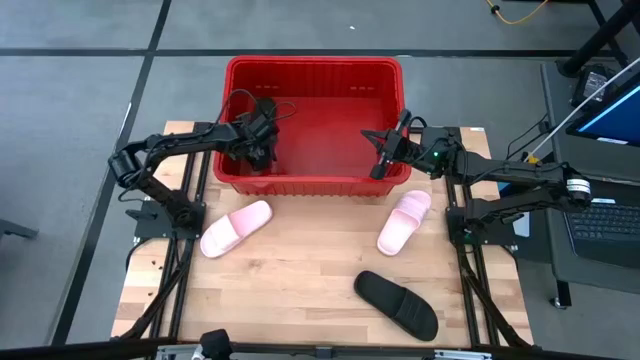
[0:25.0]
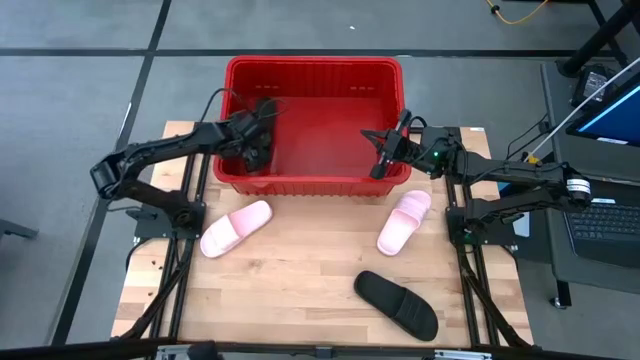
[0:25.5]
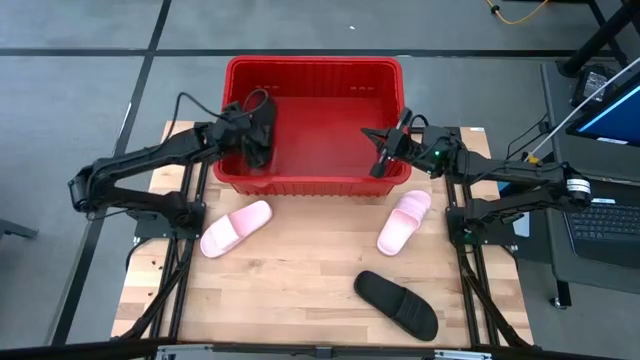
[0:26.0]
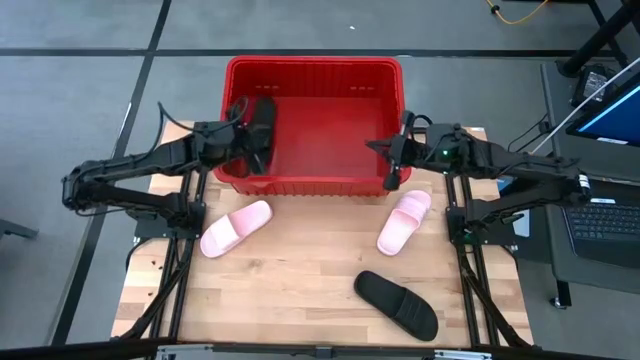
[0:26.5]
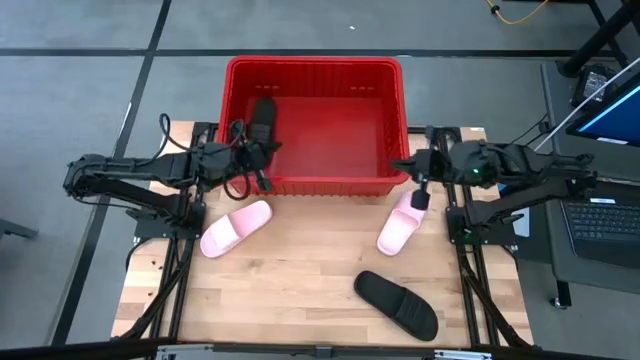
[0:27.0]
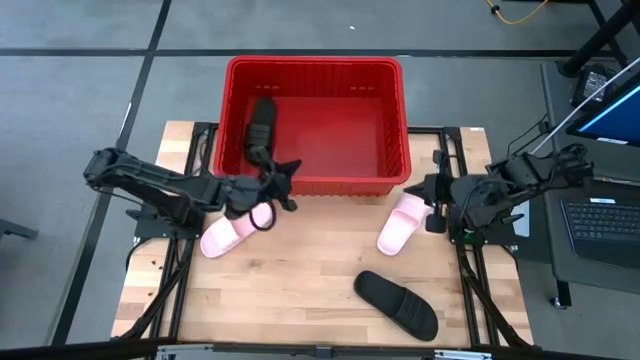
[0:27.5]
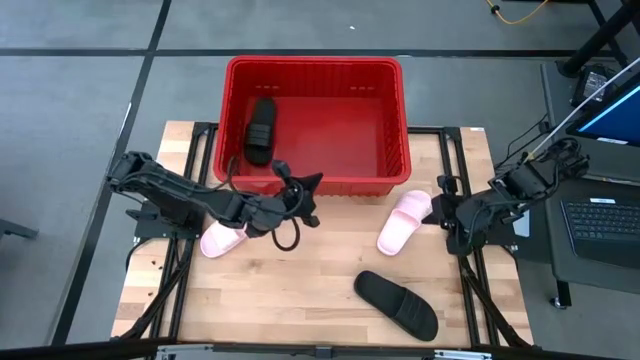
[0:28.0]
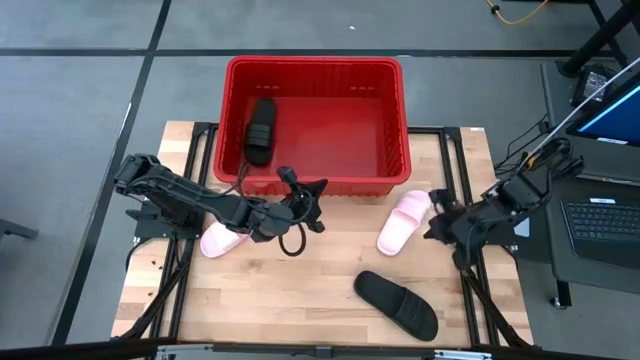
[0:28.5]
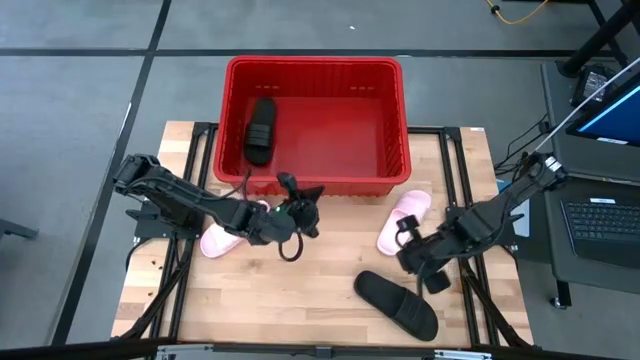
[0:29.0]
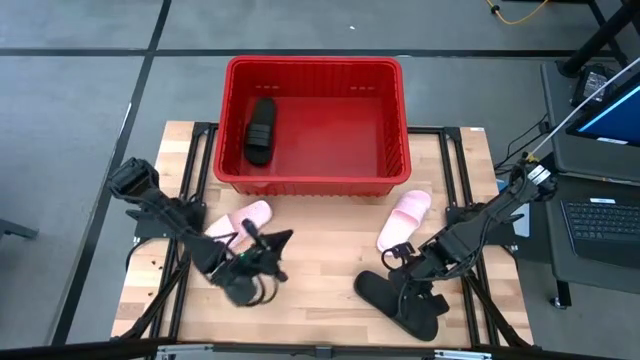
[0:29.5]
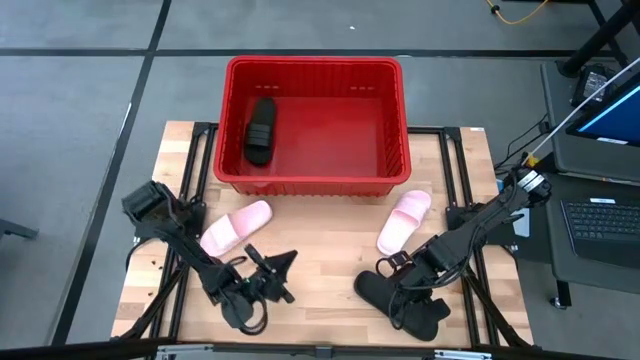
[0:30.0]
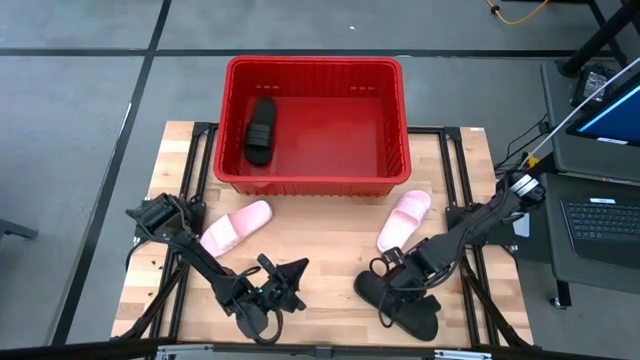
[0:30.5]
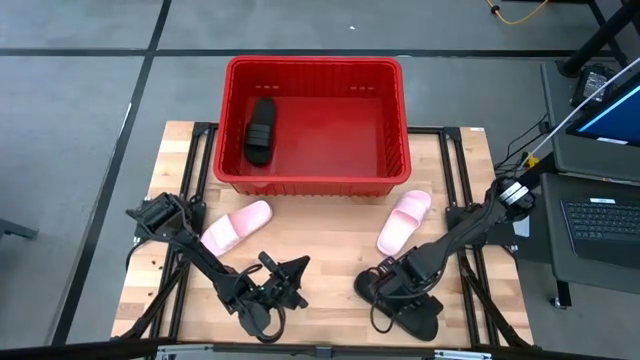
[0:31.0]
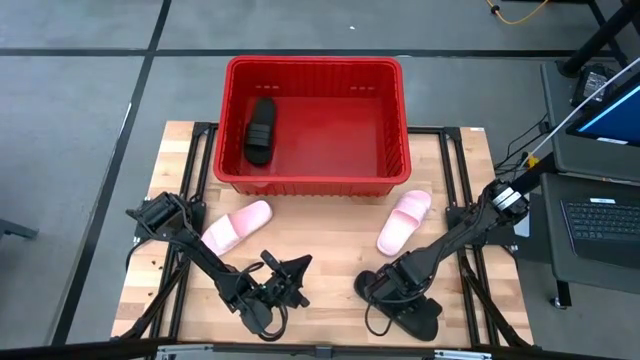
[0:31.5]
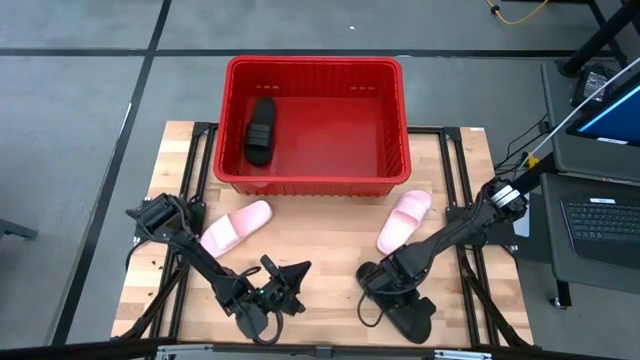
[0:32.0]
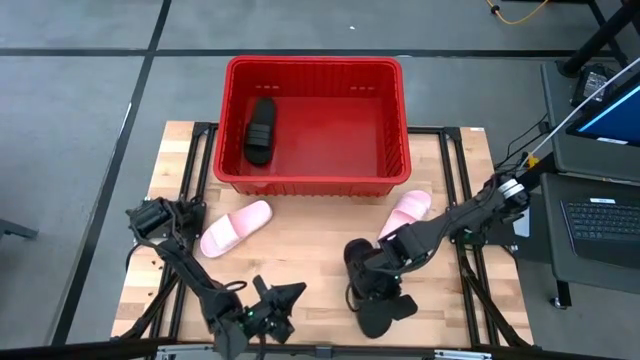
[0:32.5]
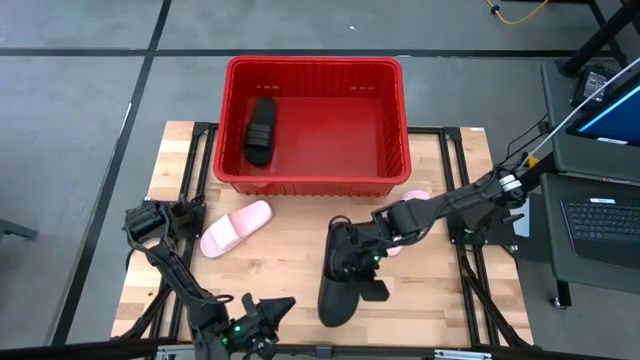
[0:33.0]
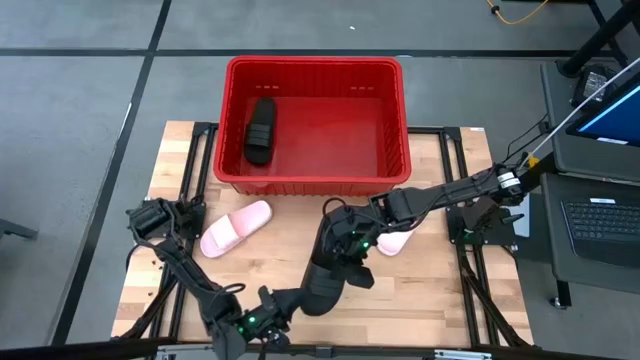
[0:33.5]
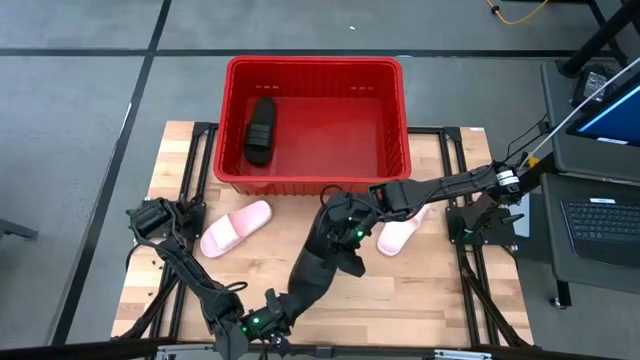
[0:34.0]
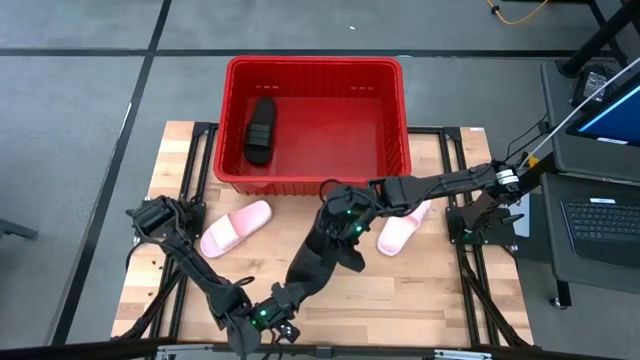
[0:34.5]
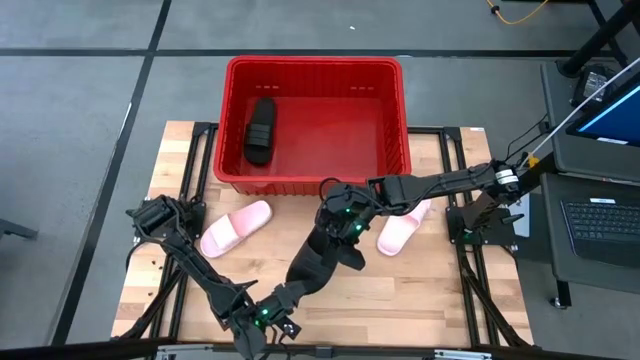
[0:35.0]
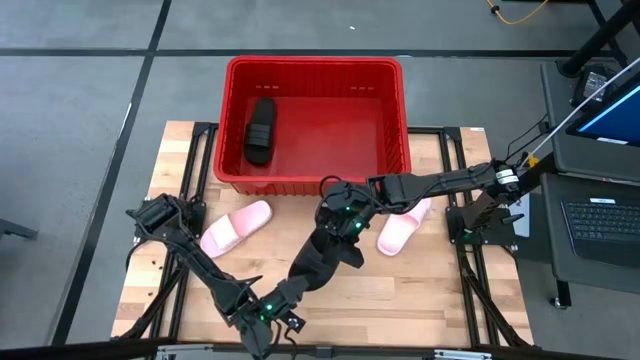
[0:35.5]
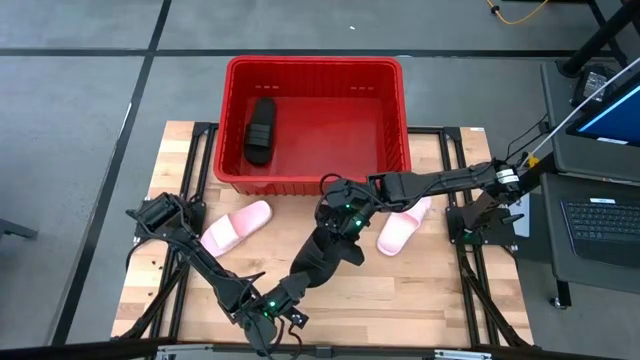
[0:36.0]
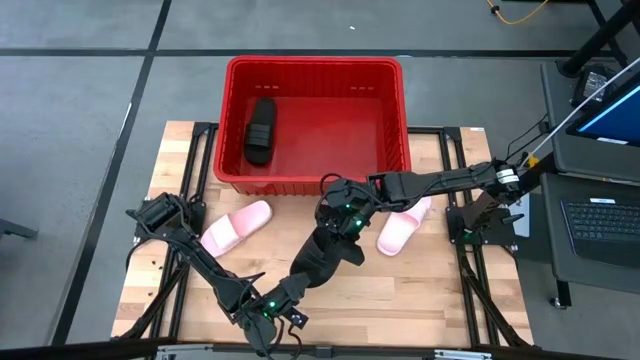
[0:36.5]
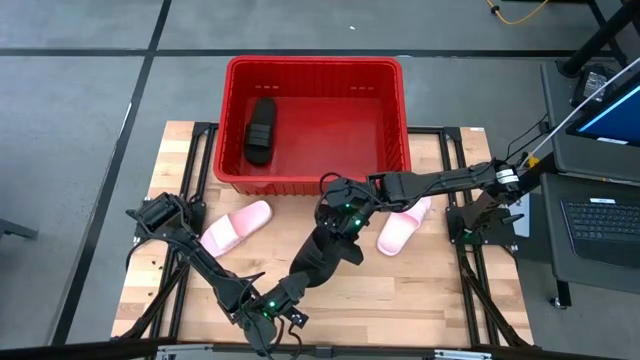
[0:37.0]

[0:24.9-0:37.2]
Task: Pick and place slides into bin
Put the black slide into the red bin

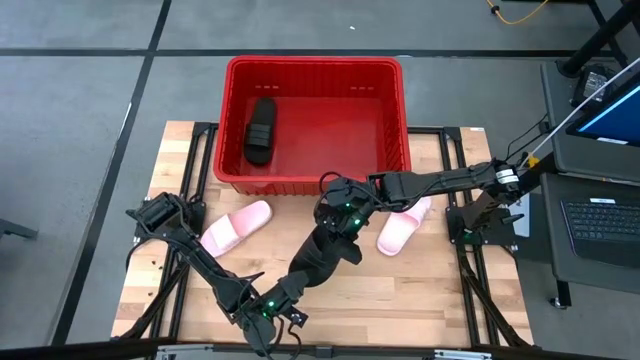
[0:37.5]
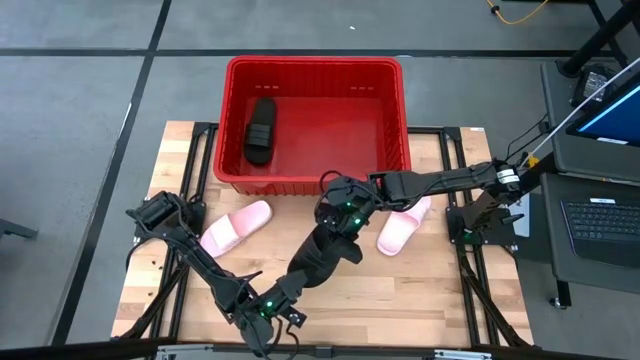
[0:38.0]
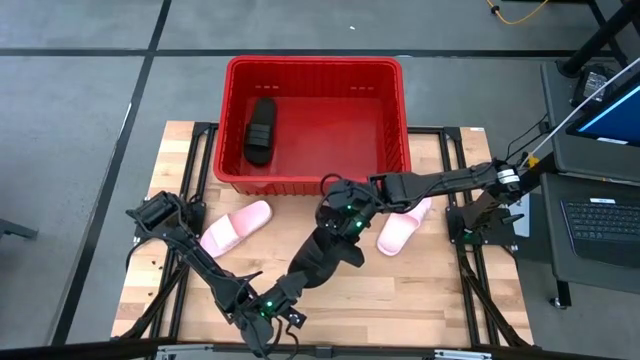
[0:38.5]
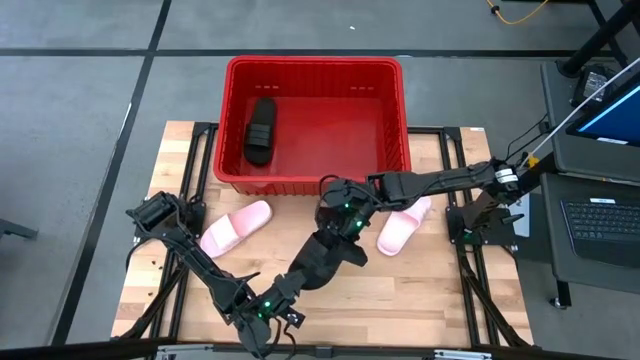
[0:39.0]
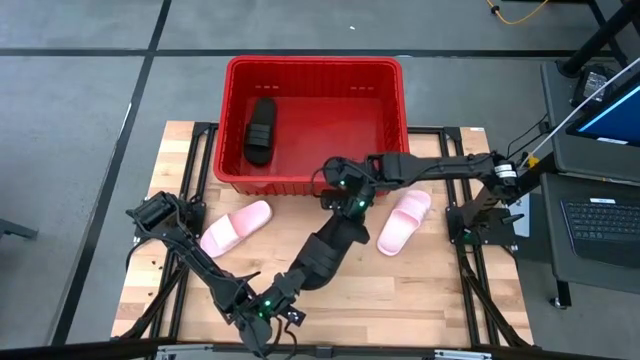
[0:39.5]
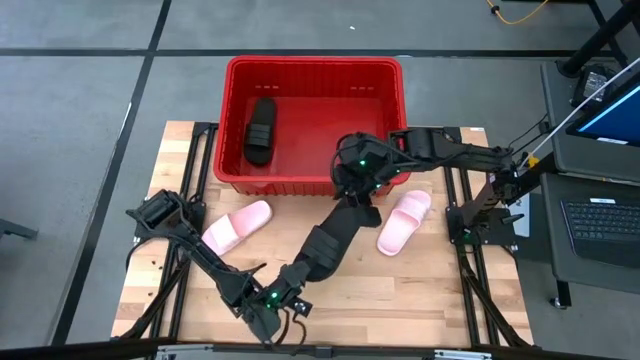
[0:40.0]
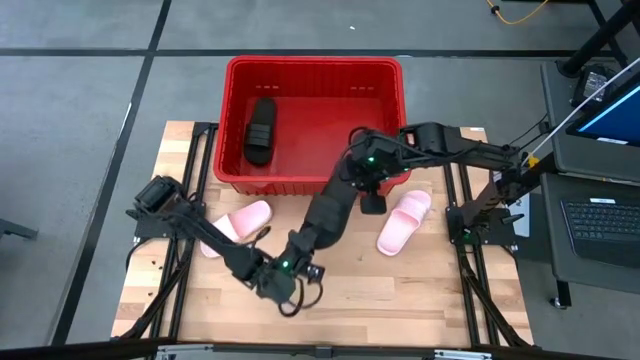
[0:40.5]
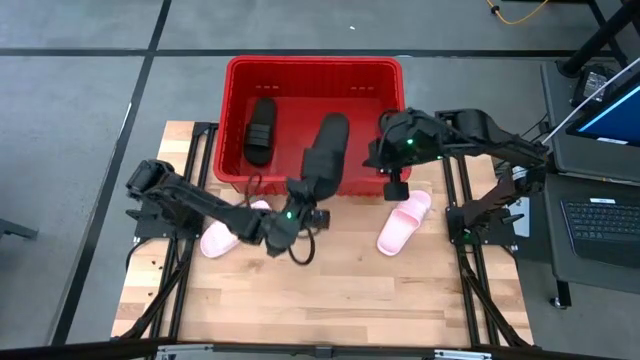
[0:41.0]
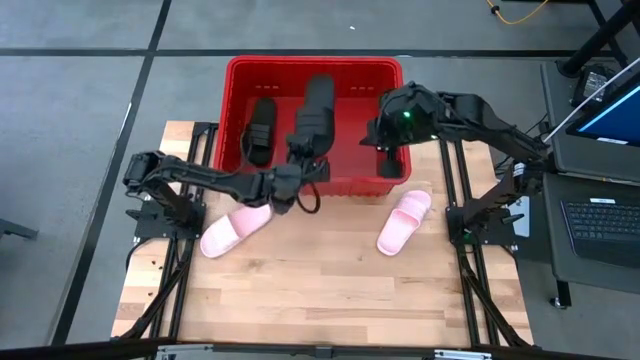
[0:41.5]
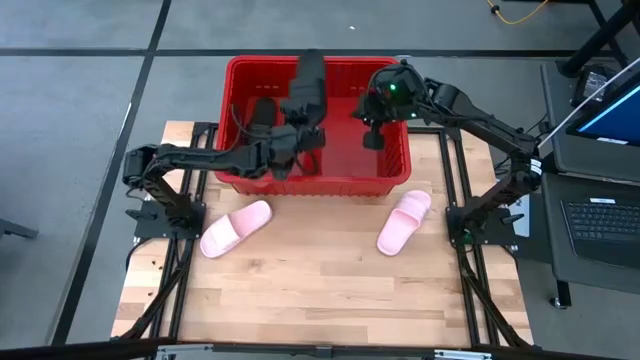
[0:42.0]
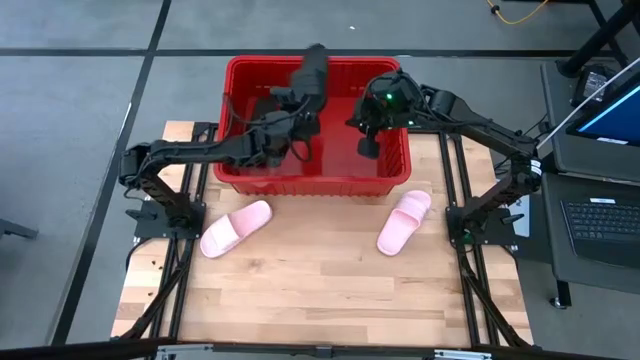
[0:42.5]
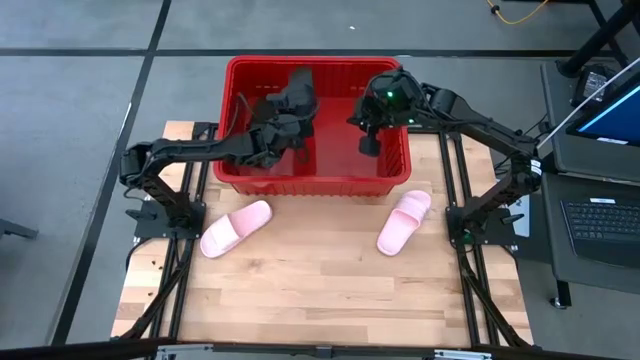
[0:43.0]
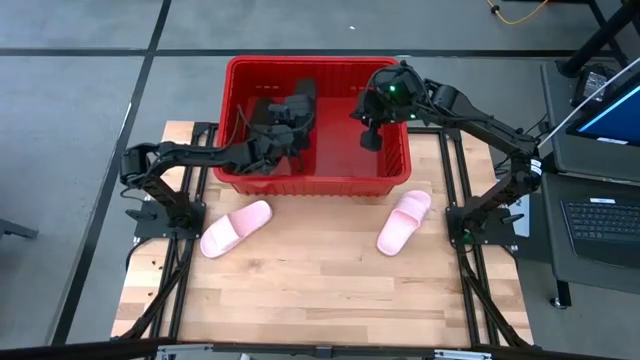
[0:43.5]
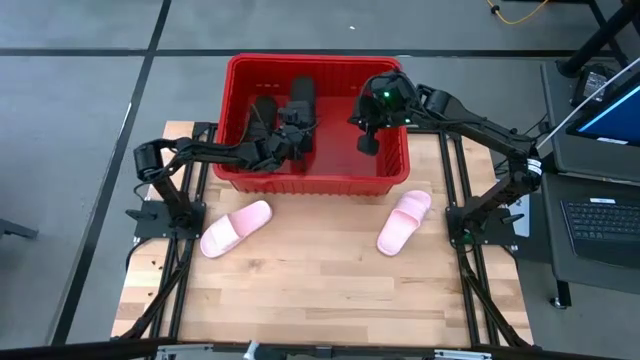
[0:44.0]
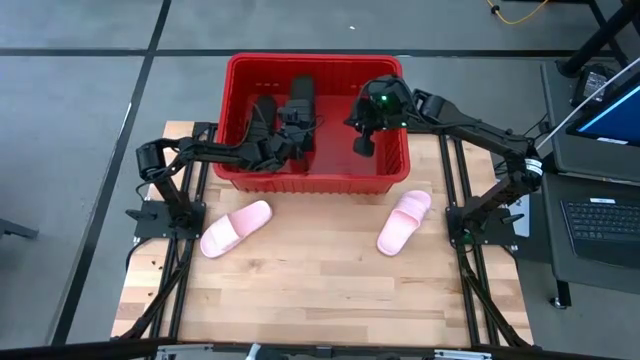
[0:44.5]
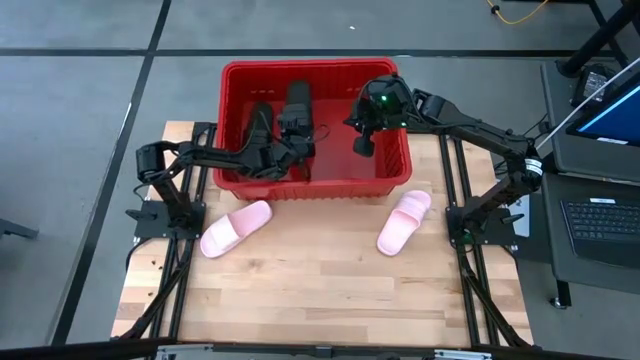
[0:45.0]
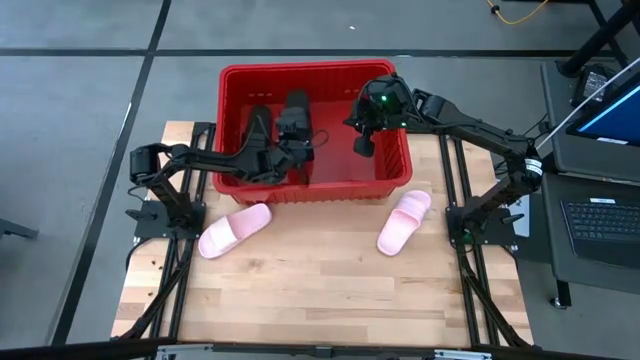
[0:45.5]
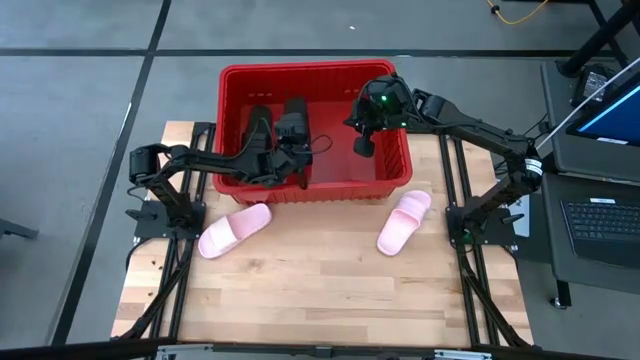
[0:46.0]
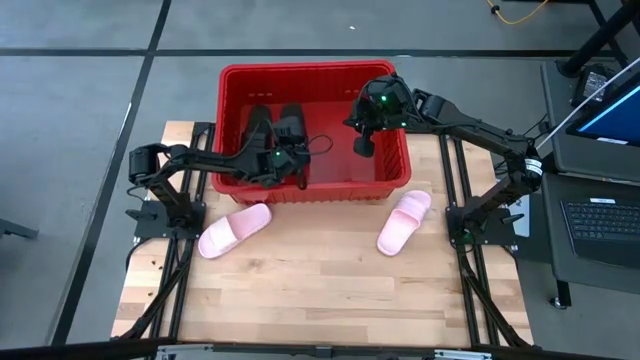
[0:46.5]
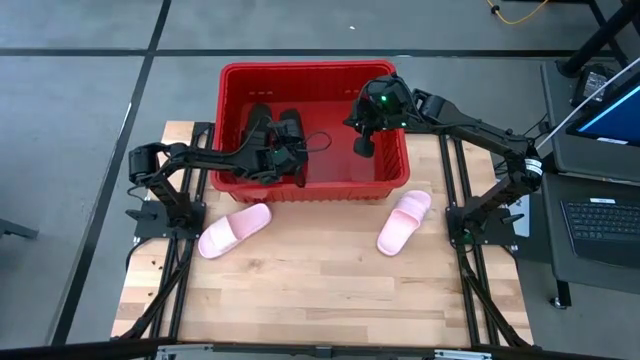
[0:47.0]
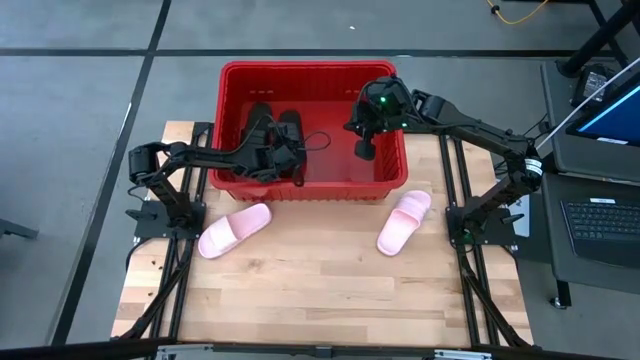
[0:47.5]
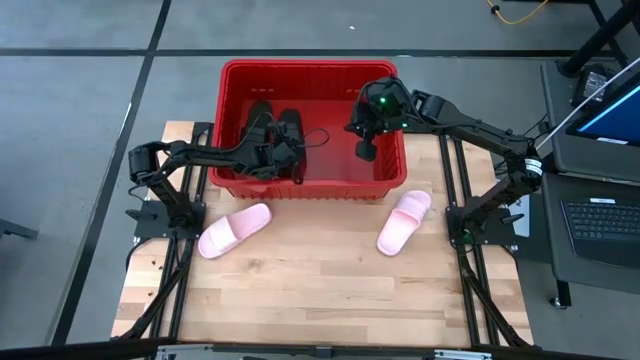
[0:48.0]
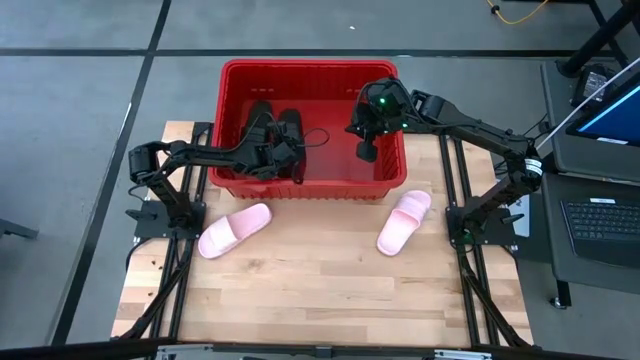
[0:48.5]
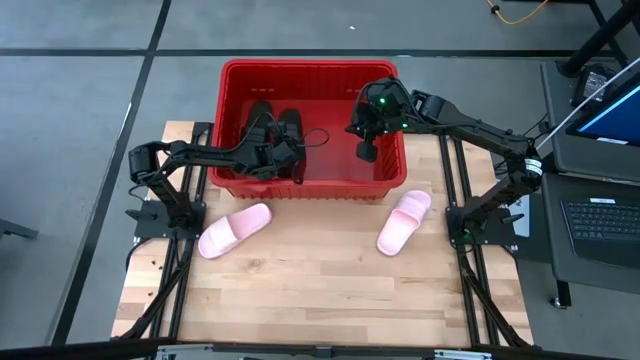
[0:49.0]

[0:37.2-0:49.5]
Put the black slide into the red bin
